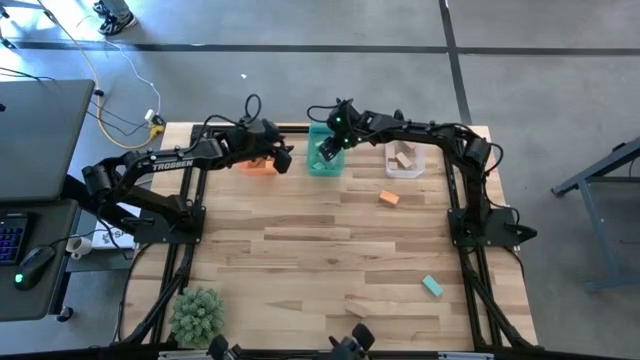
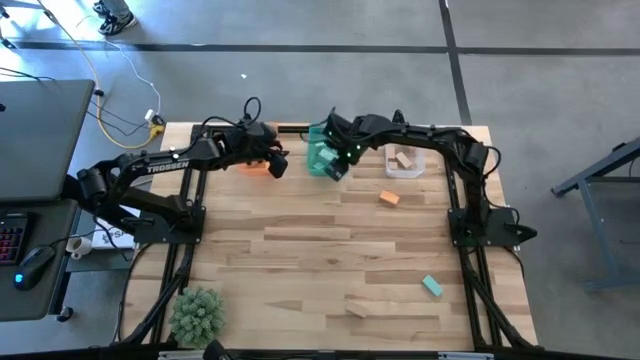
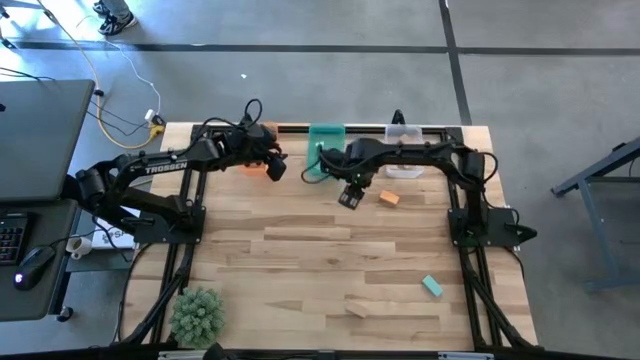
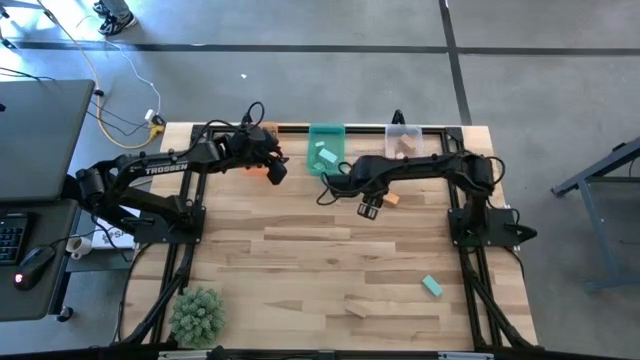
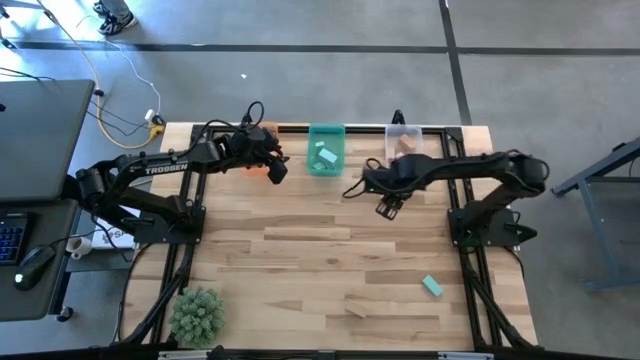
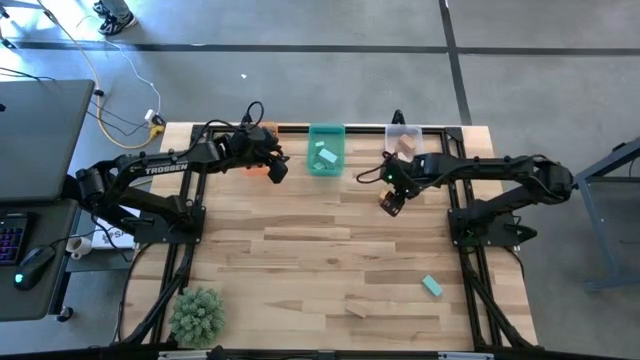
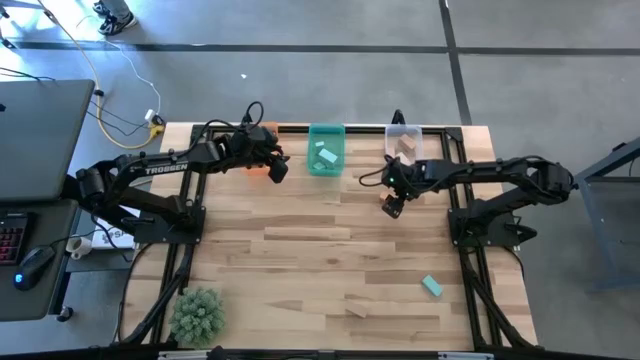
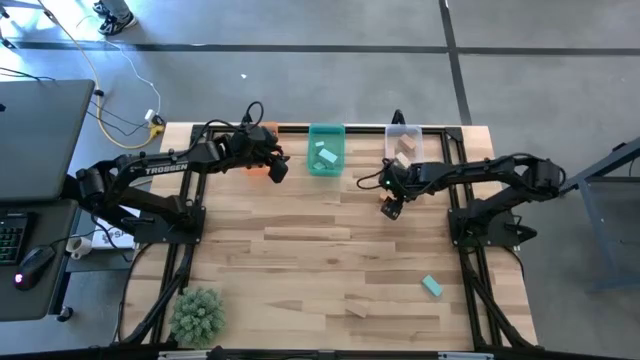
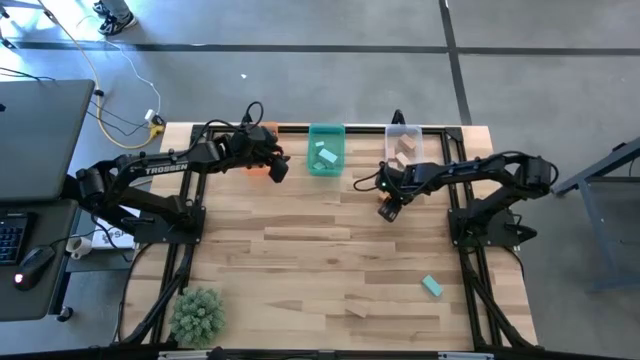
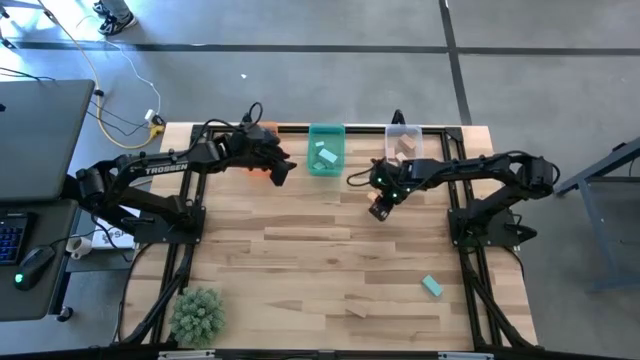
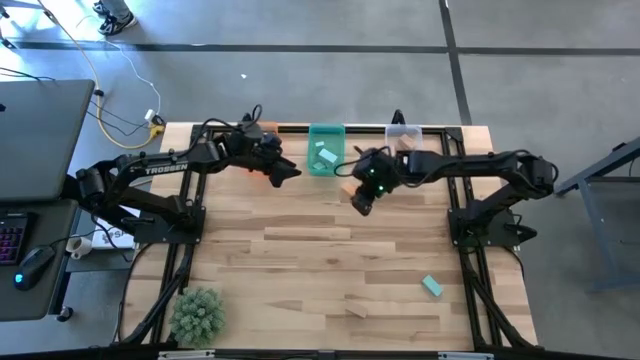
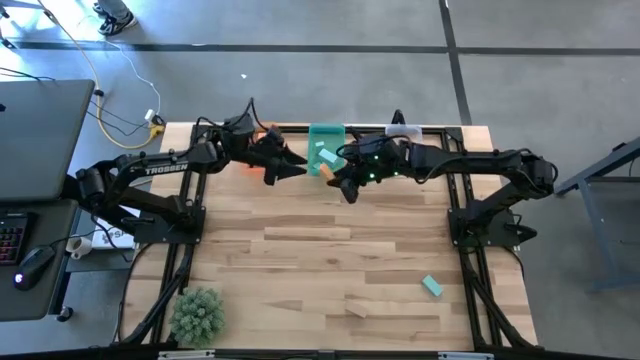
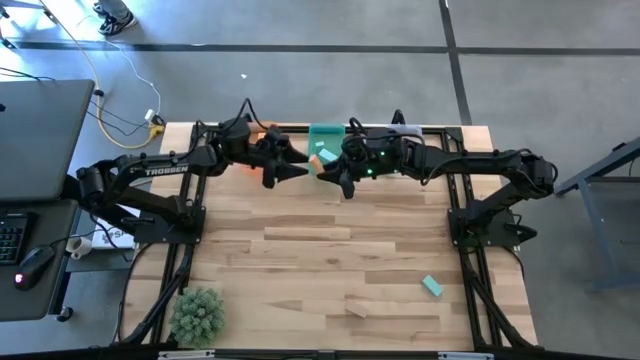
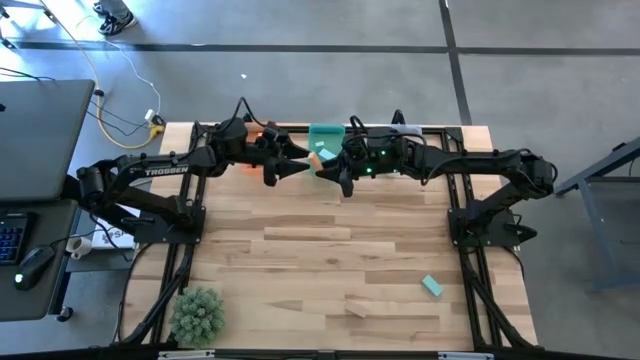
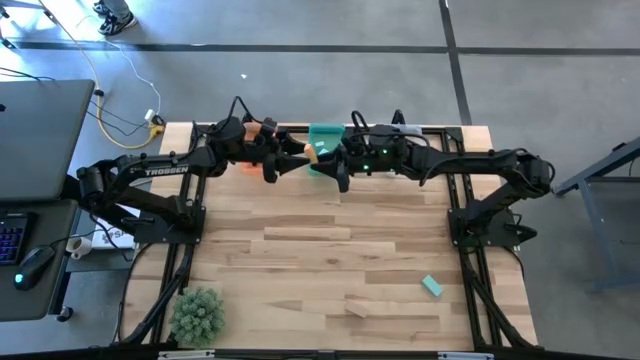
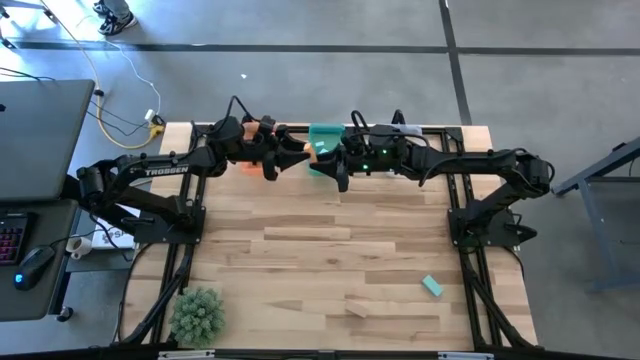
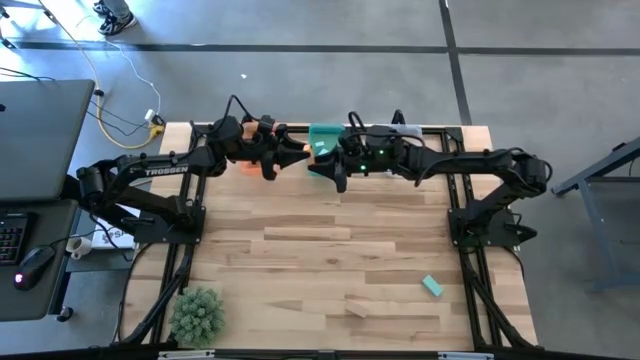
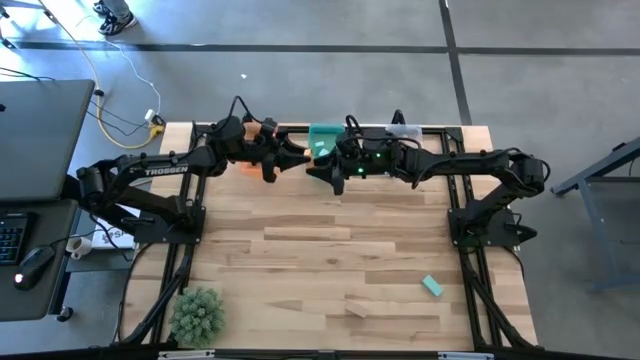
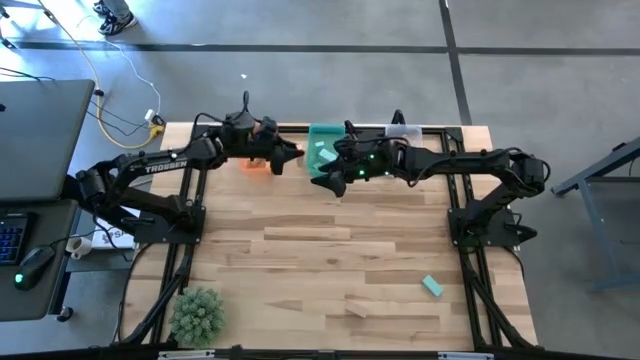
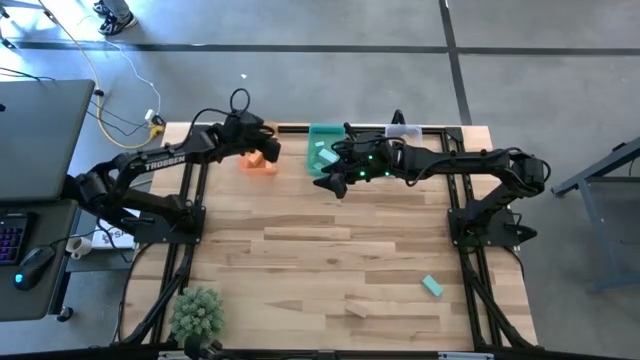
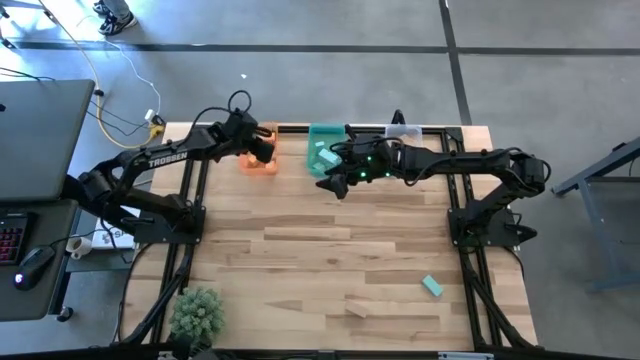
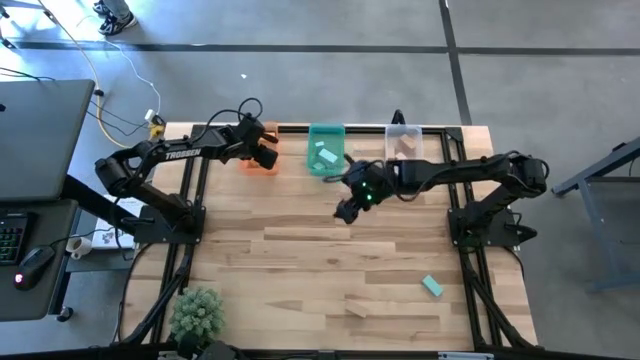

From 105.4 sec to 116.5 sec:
Task: Sort & place blocks by color
Put the orange block into the orange bin

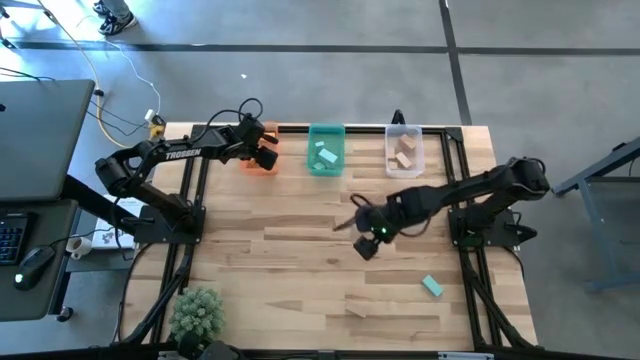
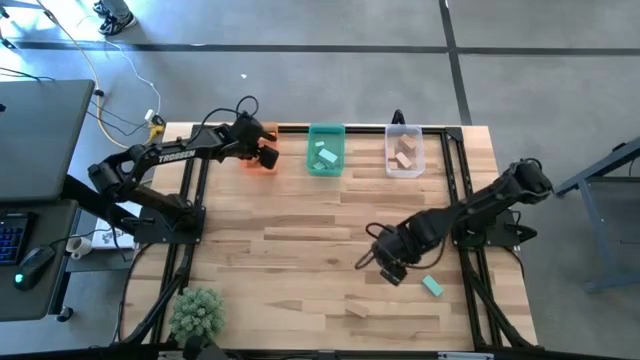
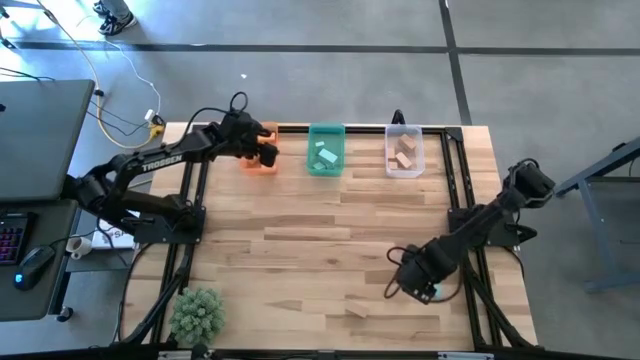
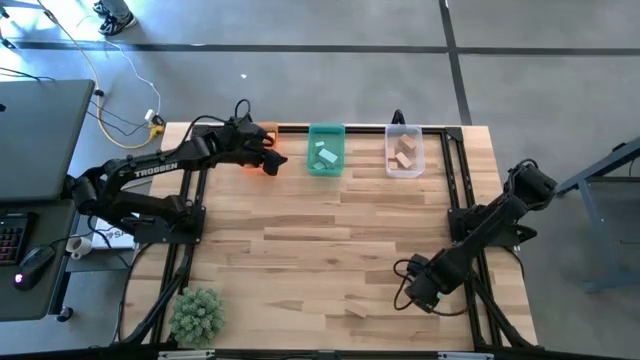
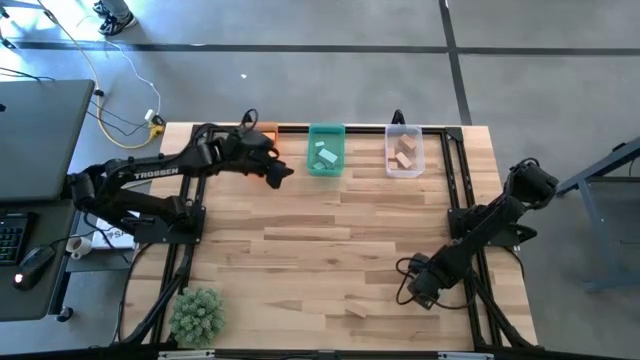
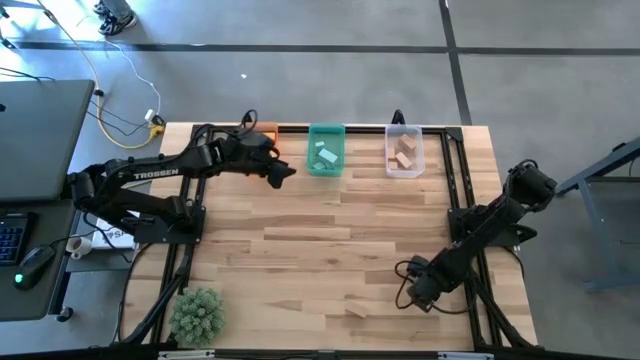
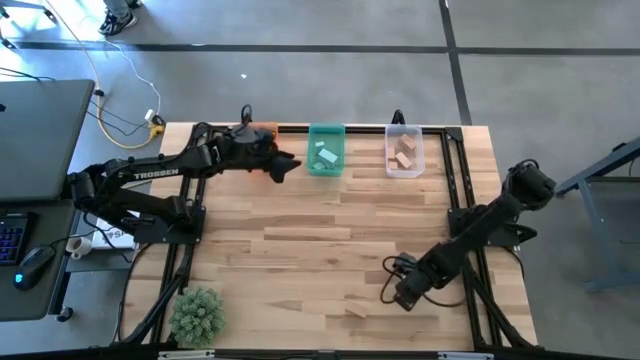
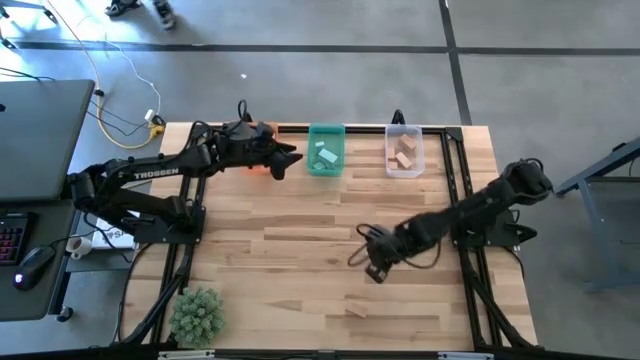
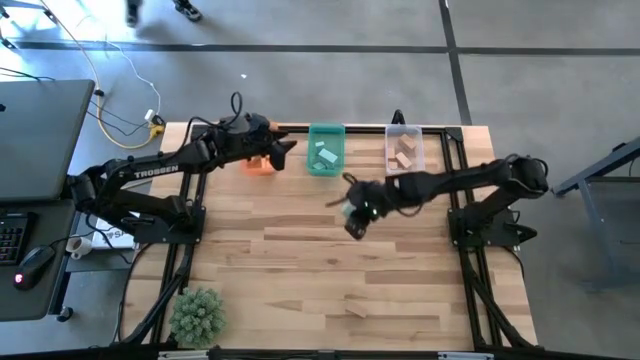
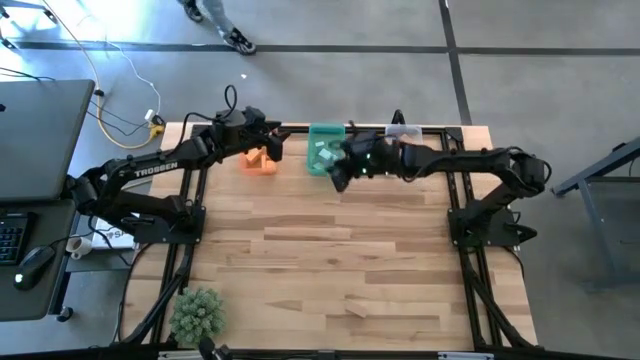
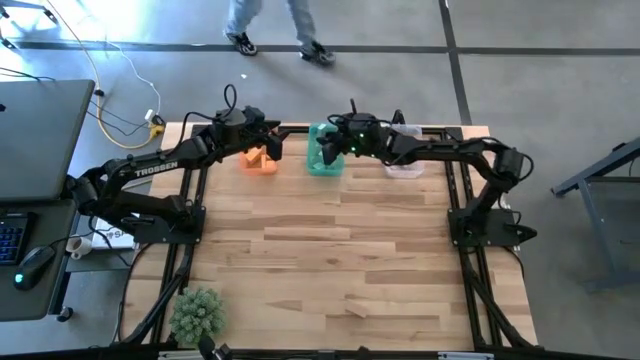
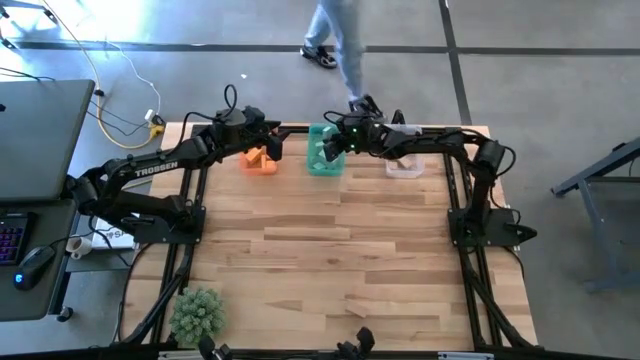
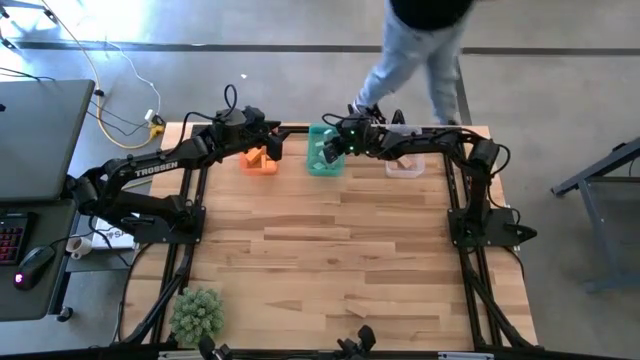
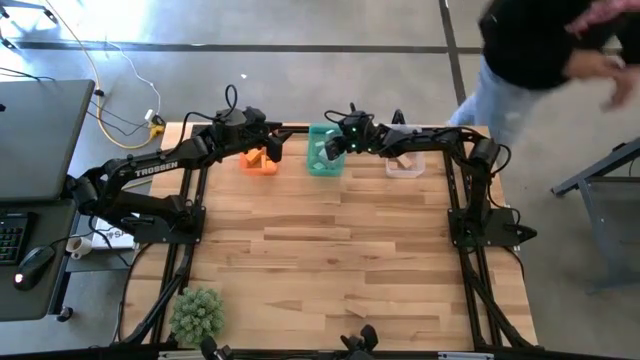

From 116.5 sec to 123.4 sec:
Put the blue block into the green bin

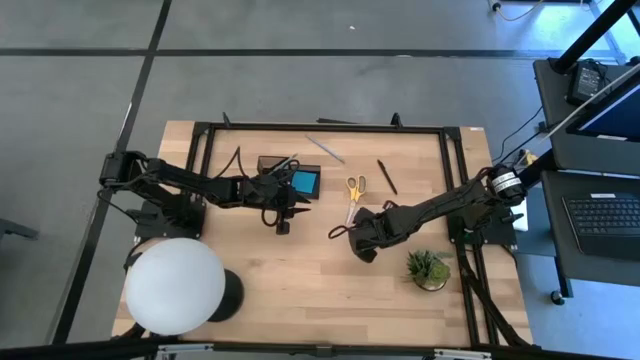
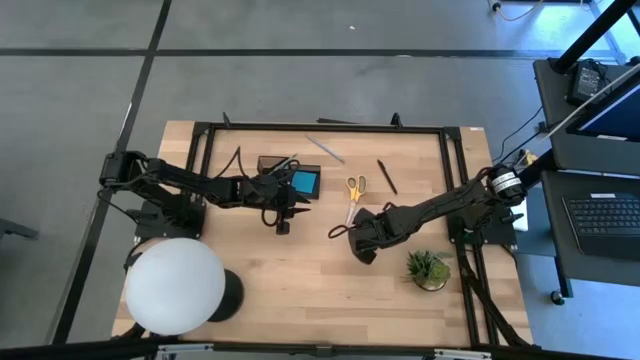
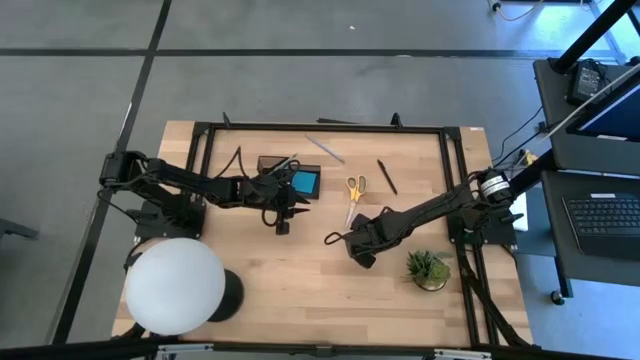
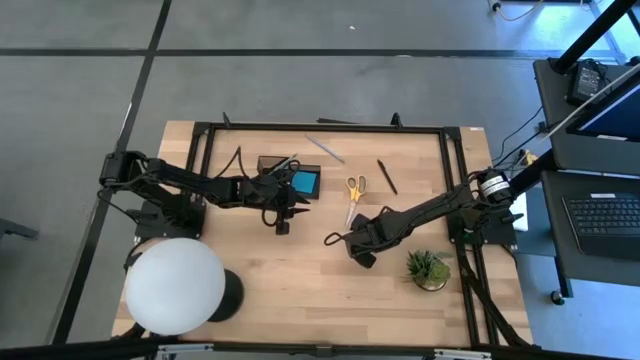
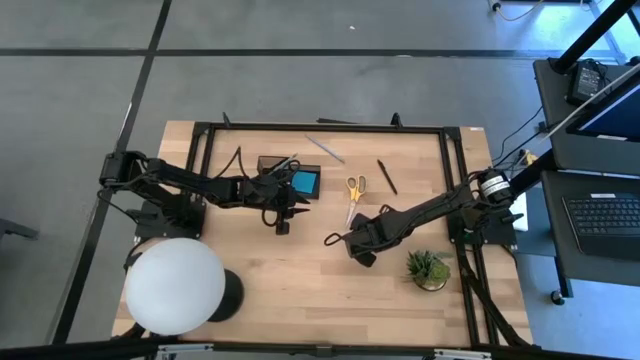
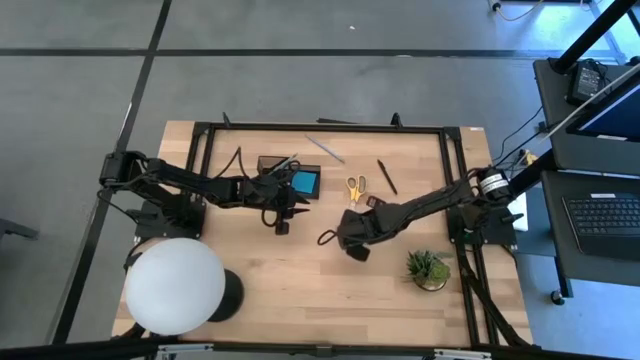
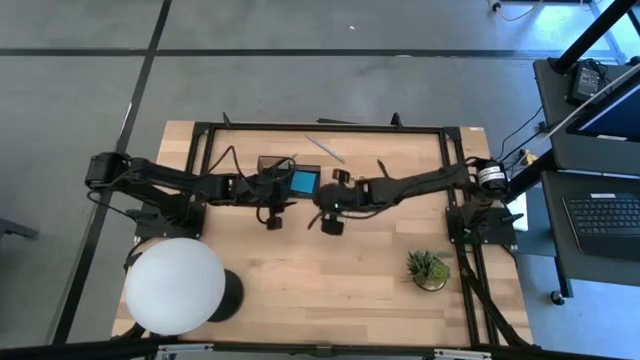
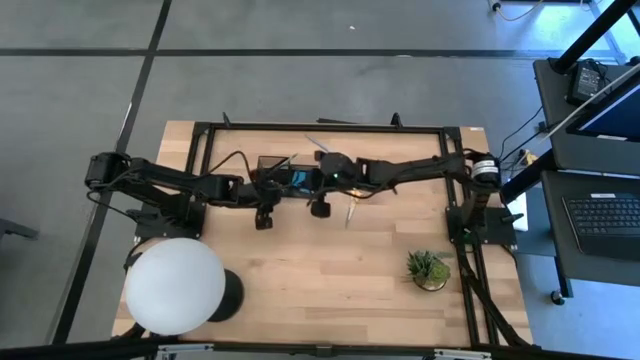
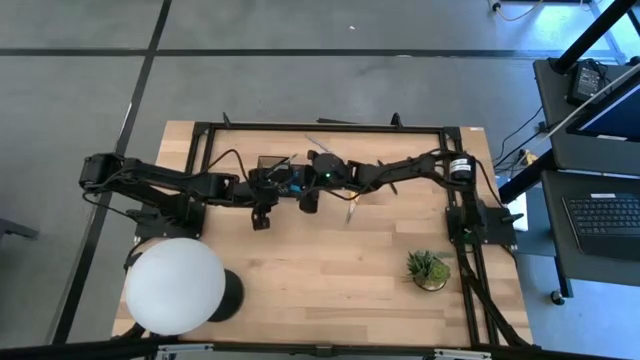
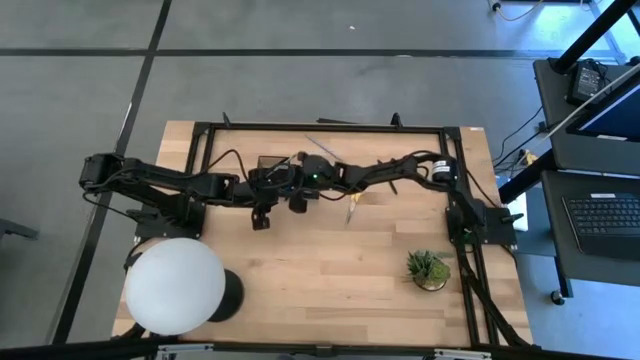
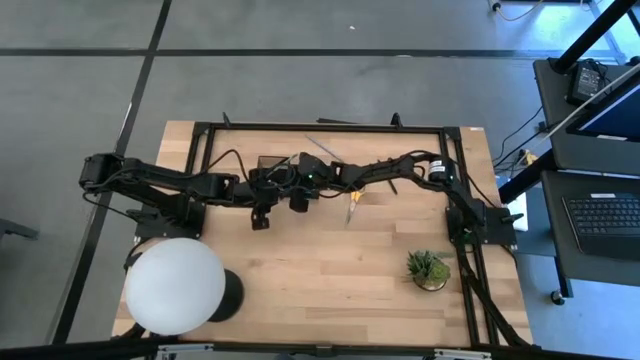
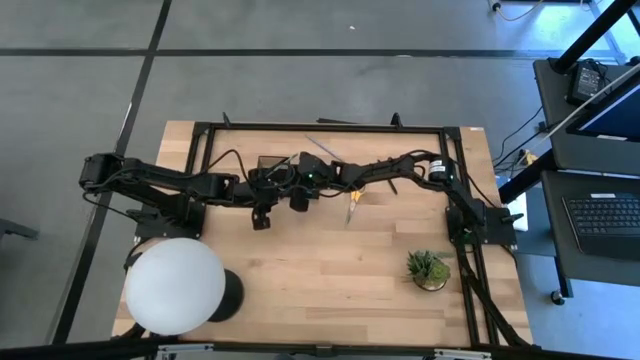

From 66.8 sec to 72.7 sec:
Task: Pick and place office supplies into organizer
Put the black binder clip into the black desk organizer
